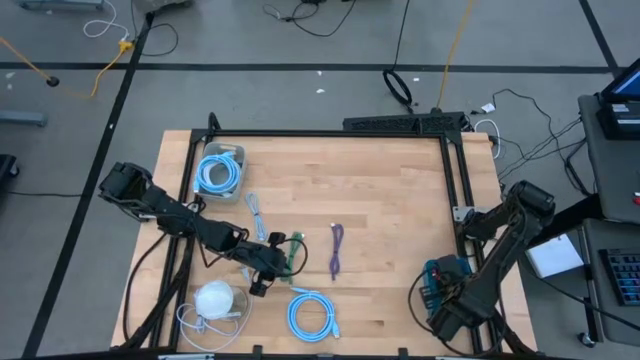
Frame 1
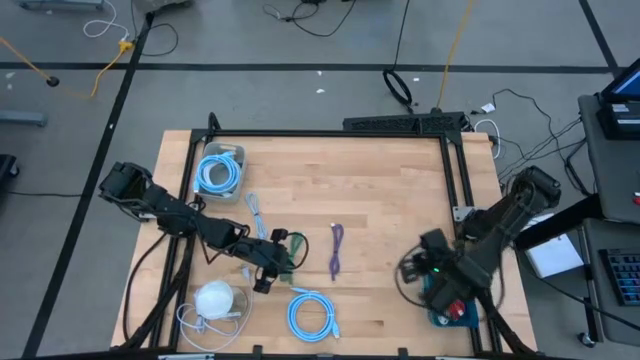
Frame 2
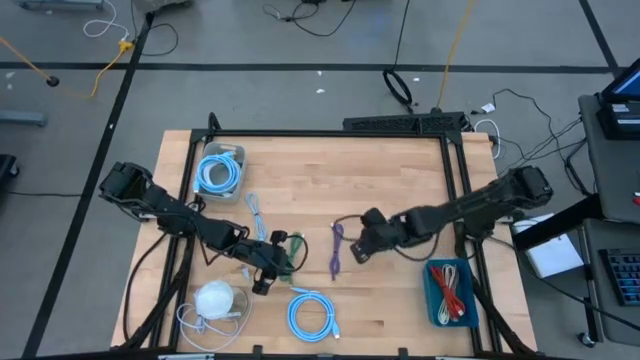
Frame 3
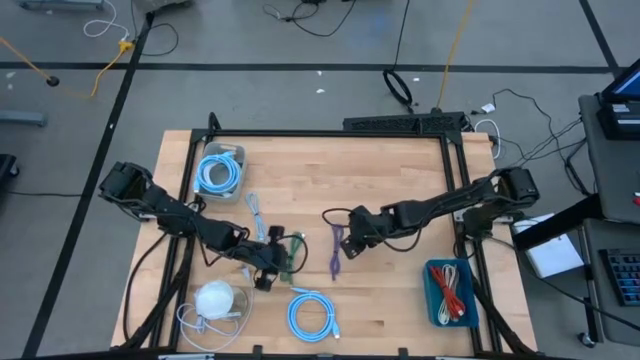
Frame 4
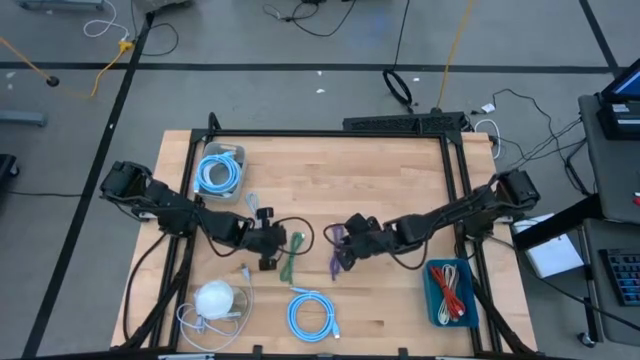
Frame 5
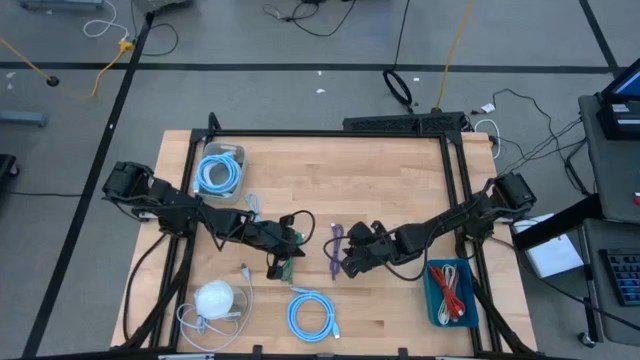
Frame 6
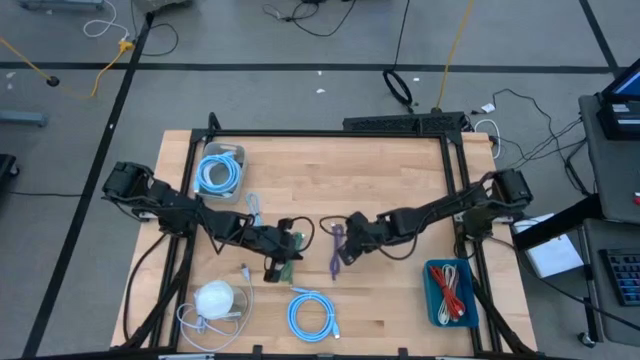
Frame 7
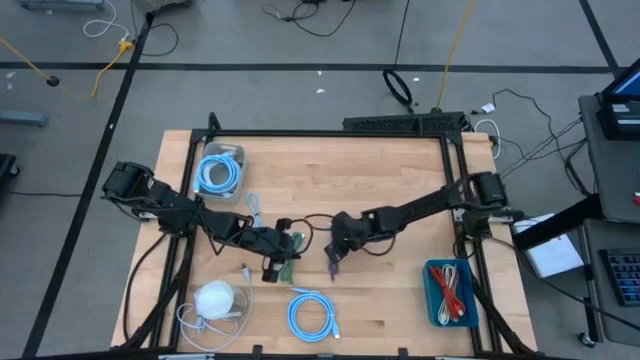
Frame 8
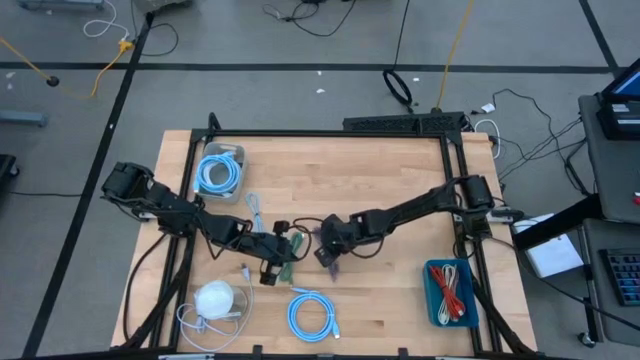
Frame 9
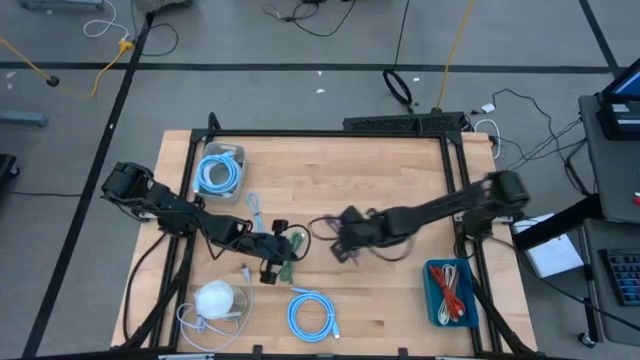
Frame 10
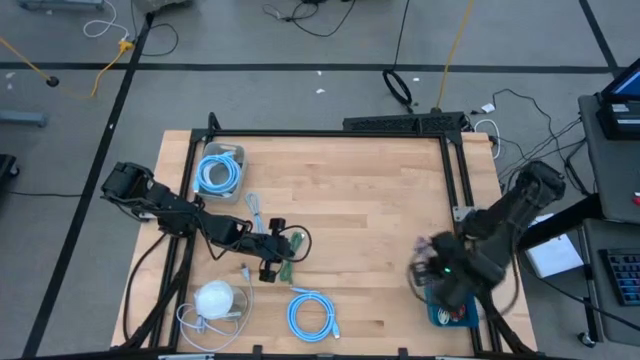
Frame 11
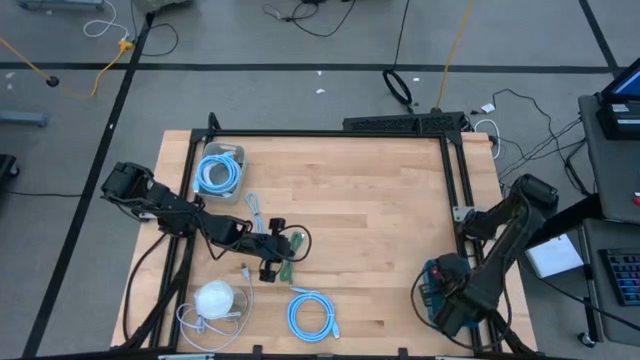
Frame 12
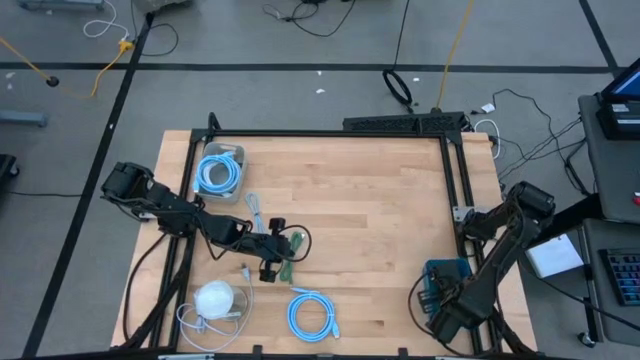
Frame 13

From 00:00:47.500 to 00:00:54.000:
Task: Pick & Place USB Port
Put the gray USB cable into the blue basket

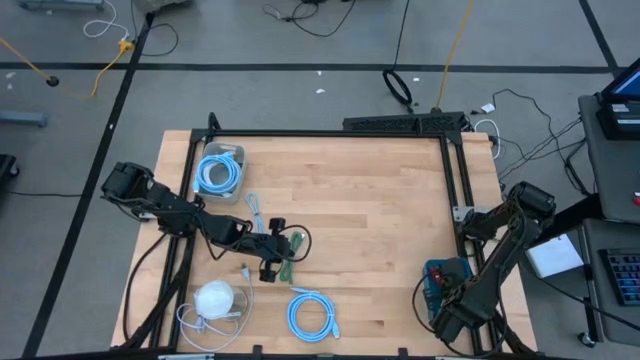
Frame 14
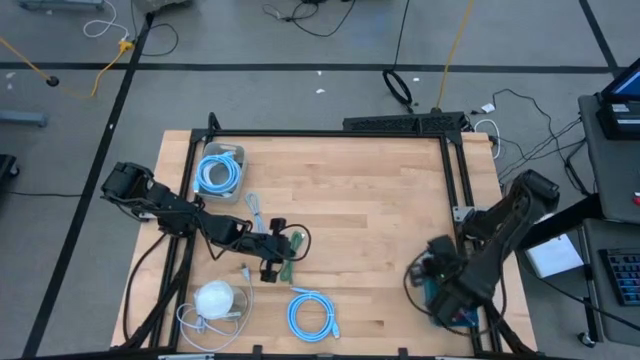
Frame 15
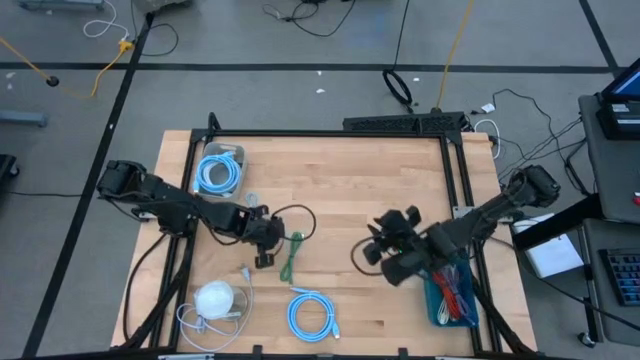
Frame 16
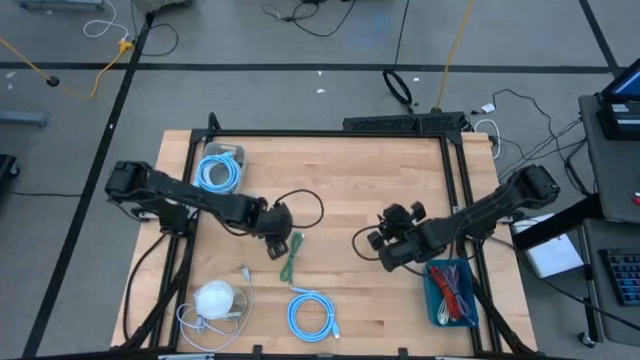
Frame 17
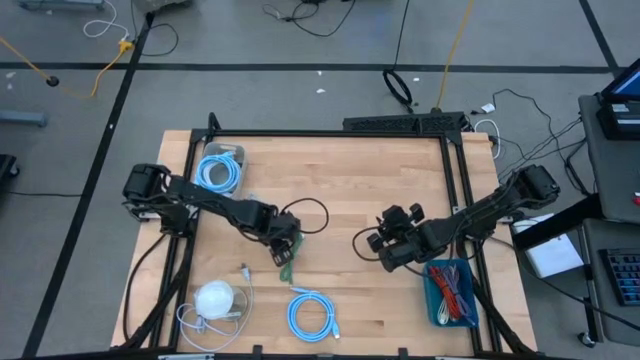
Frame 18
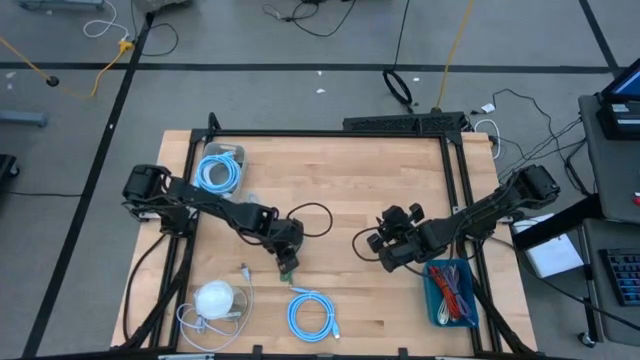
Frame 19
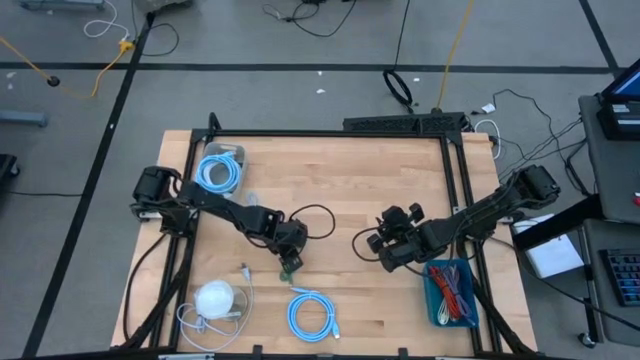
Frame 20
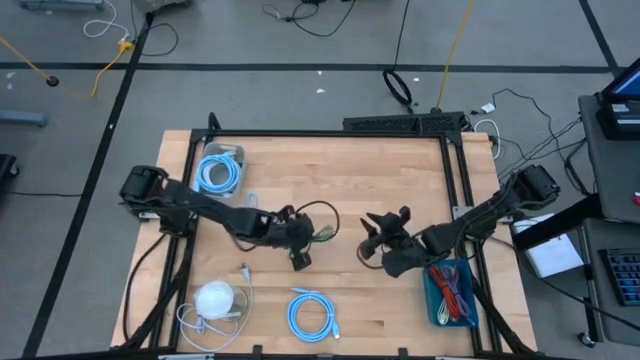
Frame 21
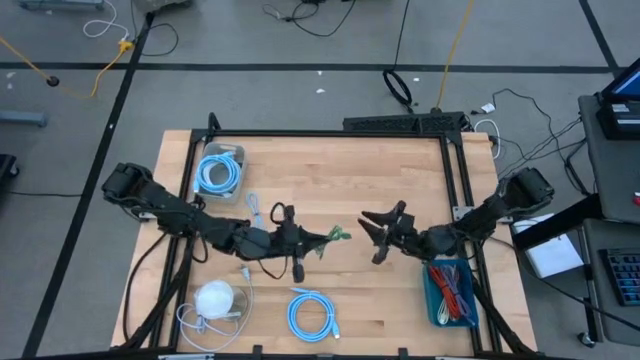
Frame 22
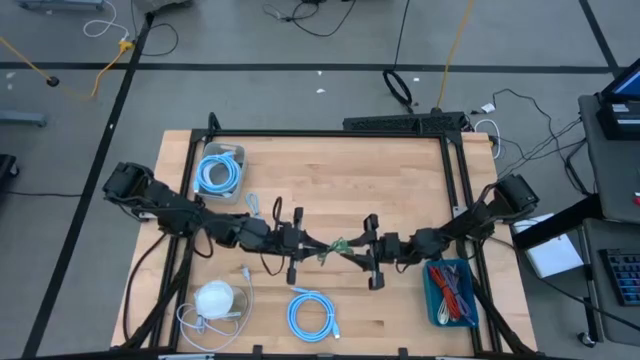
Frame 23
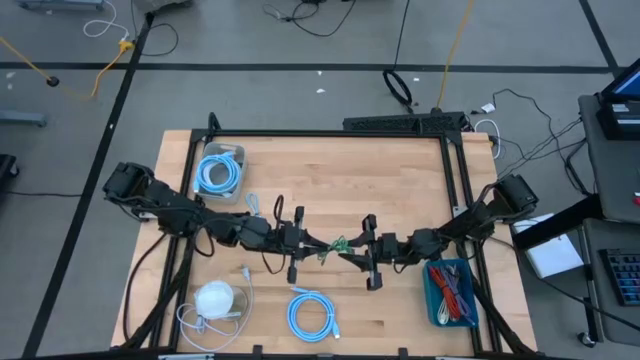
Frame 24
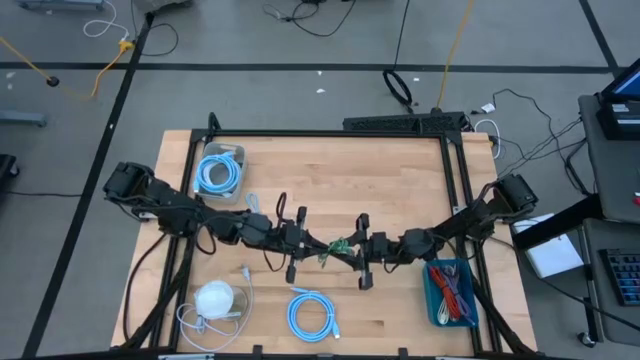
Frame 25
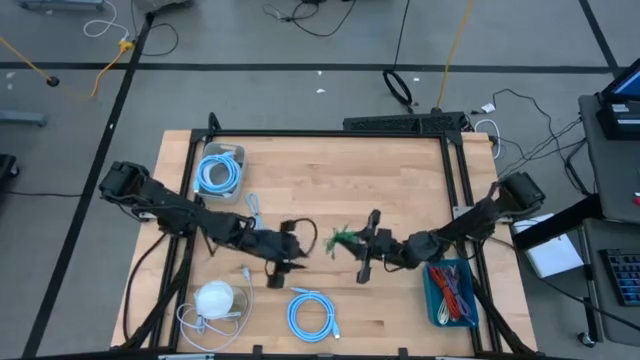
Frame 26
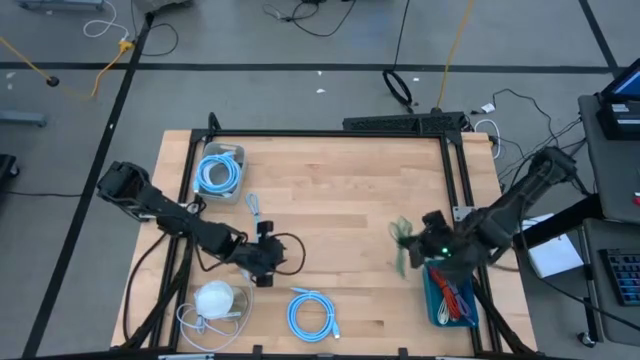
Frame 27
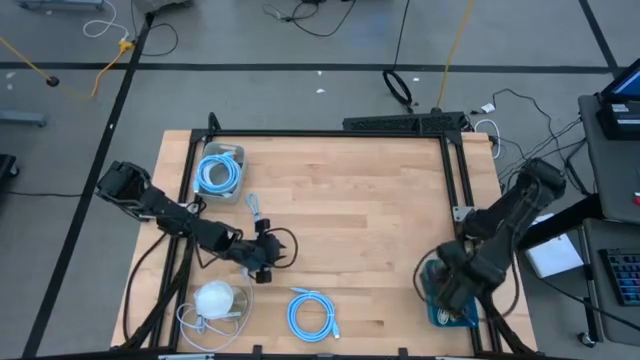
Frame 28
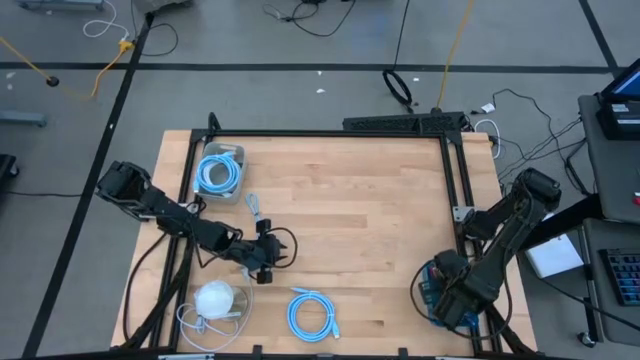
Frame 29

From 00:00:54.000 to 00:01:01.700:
Put the green USB cable into the blue basket

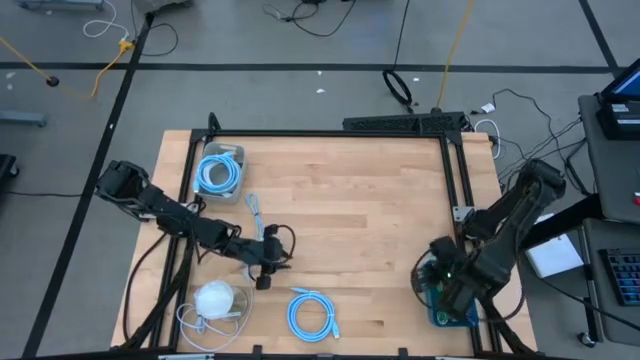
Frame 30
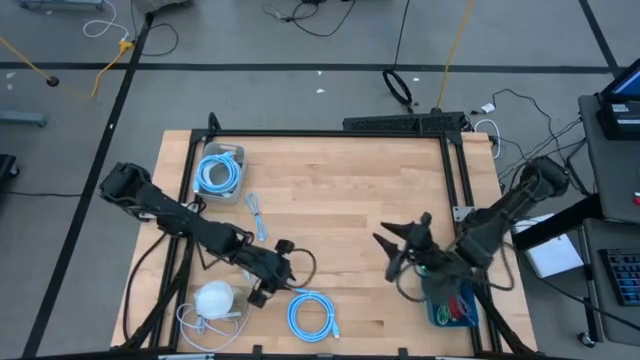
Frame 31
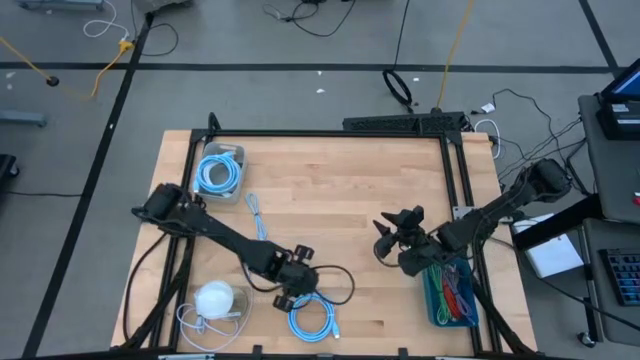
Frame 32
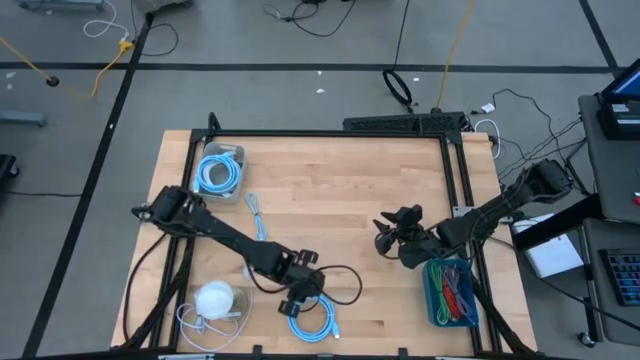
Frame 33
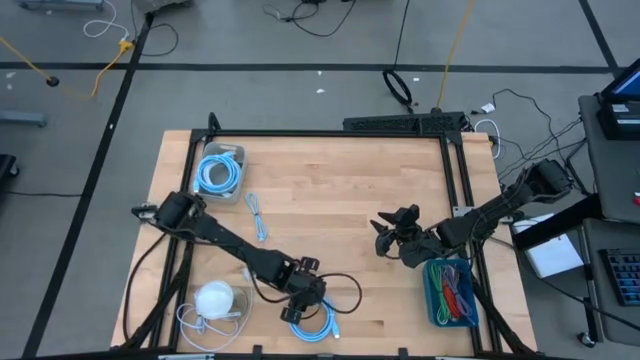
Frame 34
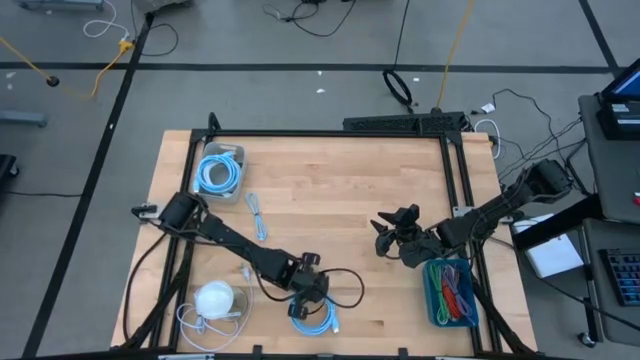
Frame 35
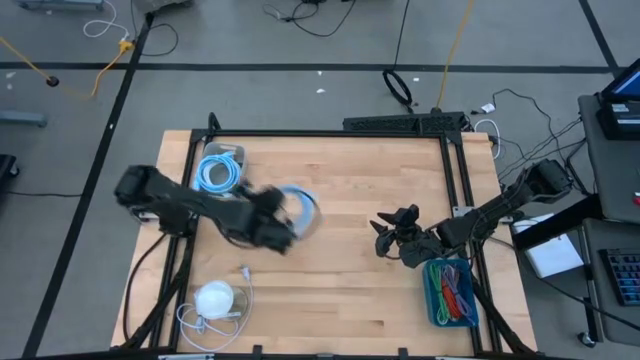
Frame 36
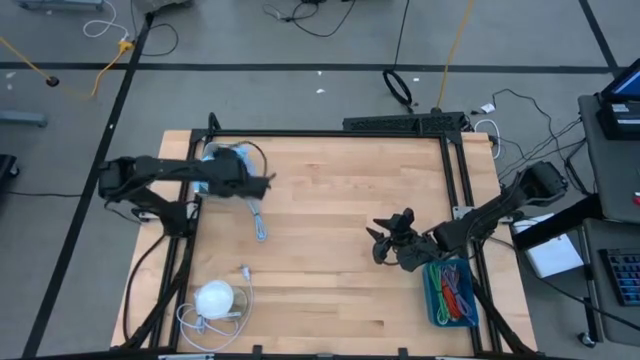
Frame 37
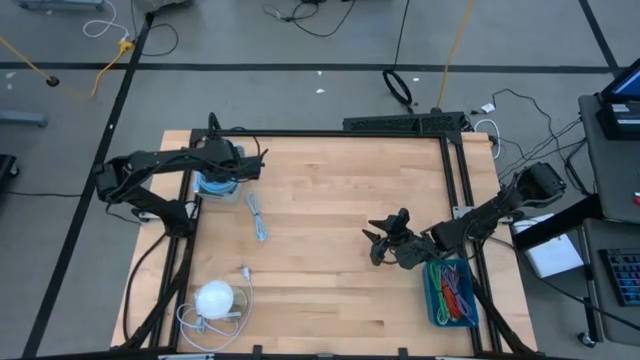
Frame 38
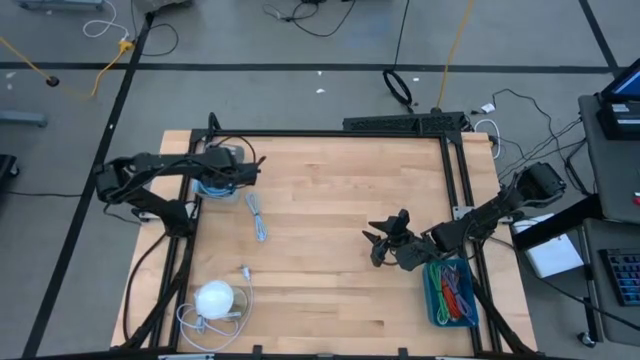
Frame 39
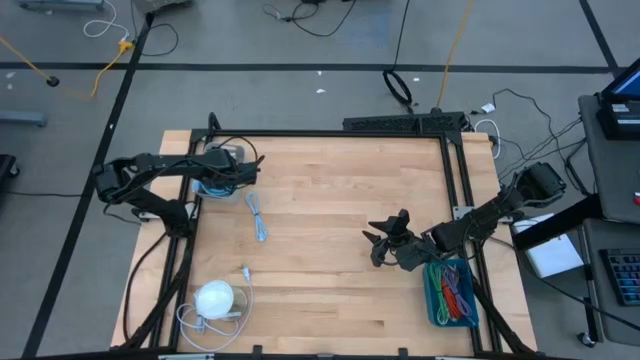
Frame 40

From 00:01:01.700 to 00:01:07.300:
Put the blue HDMI cable into the gray basket

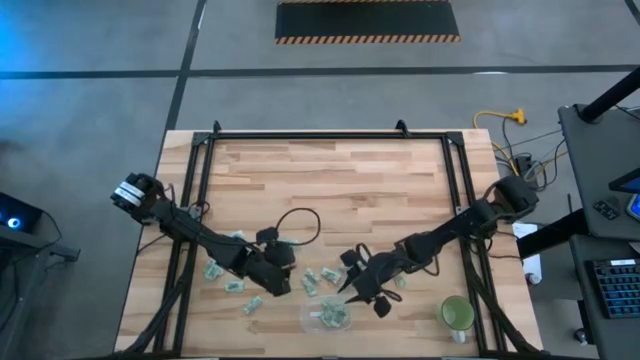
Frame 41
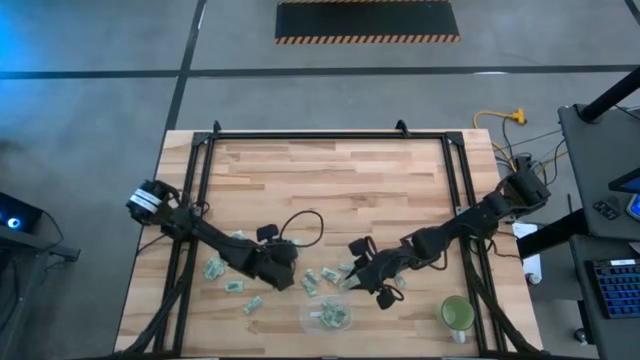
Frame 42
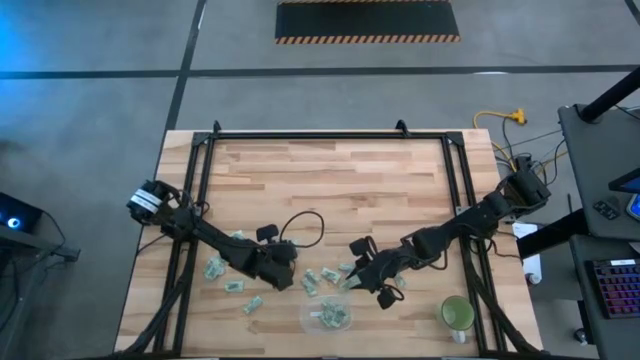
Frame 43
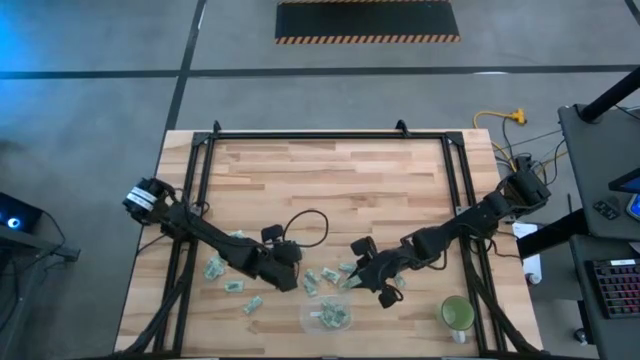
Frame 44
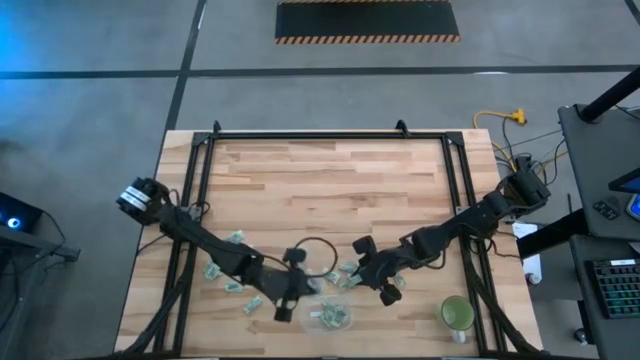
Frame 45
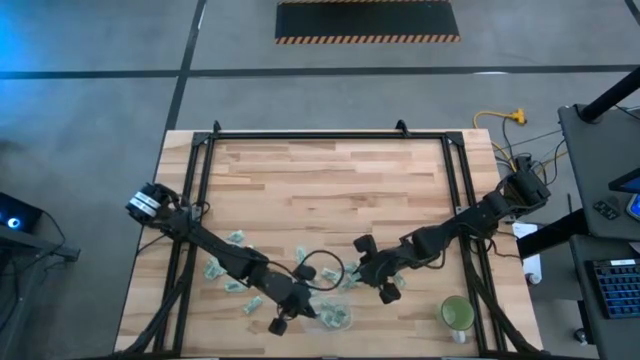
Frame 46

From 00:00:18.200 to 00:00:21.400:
Task: Pick and place Stevia / Truvia into bins
Put the stevia packet into the transparent container
